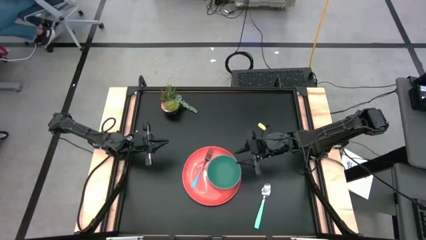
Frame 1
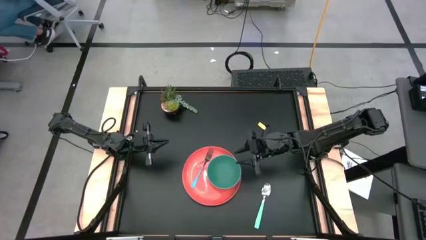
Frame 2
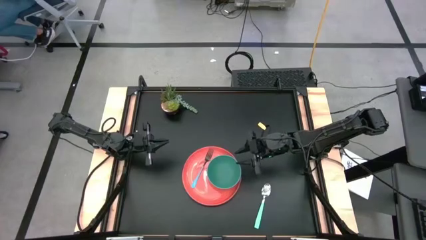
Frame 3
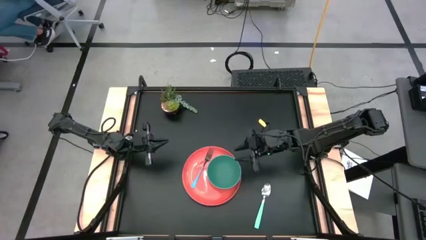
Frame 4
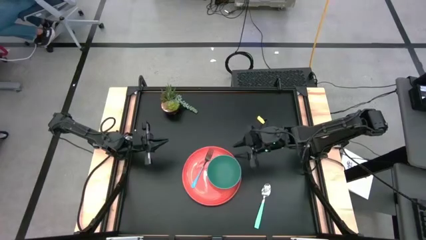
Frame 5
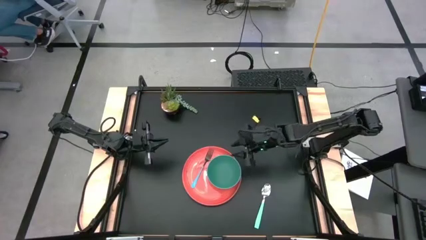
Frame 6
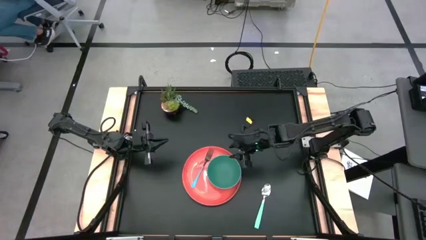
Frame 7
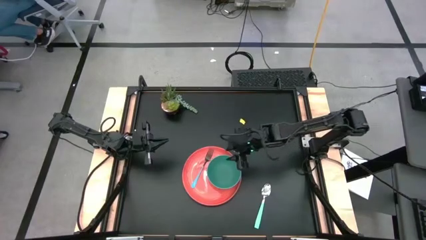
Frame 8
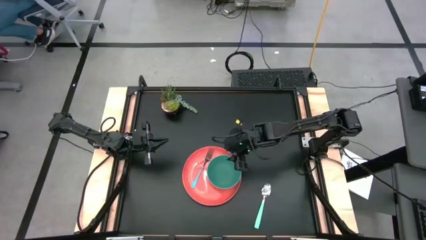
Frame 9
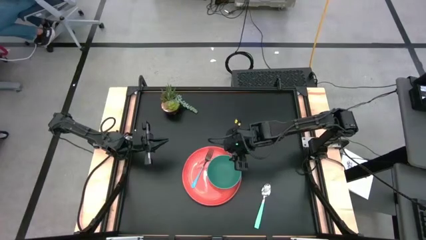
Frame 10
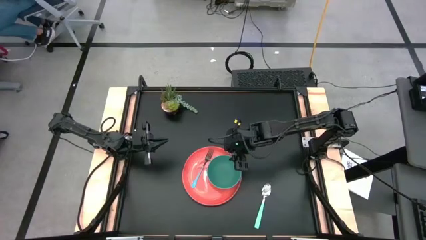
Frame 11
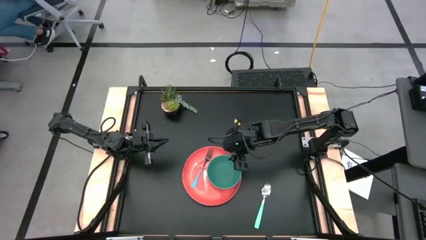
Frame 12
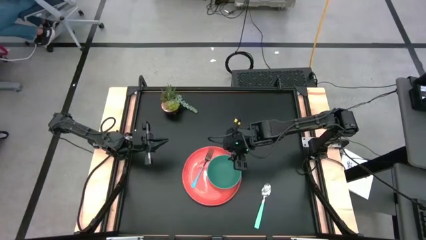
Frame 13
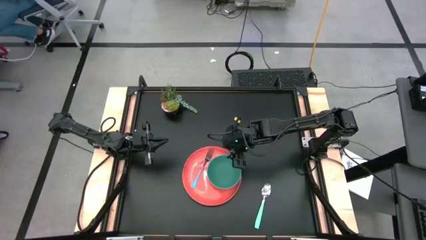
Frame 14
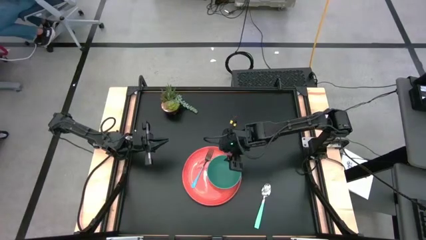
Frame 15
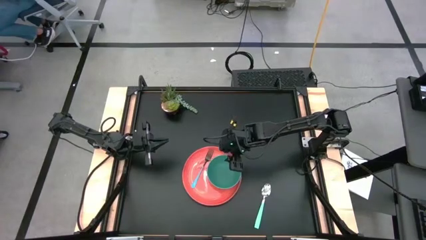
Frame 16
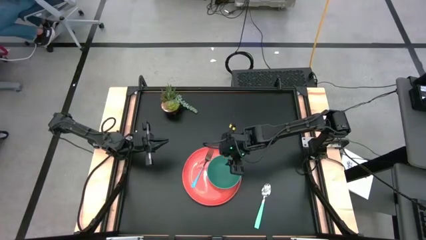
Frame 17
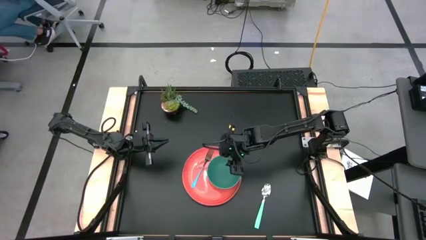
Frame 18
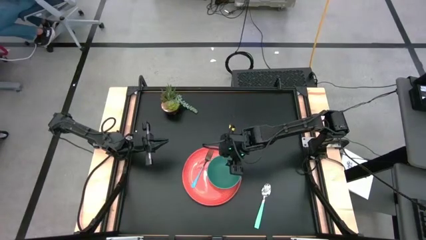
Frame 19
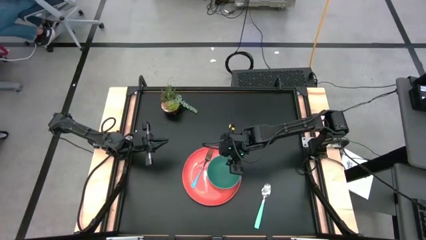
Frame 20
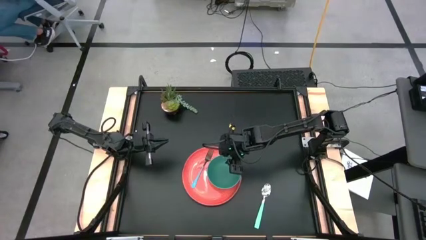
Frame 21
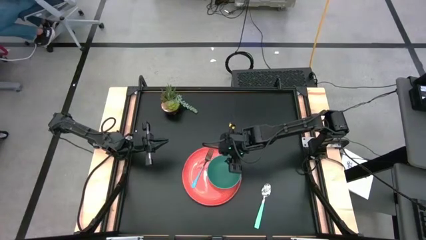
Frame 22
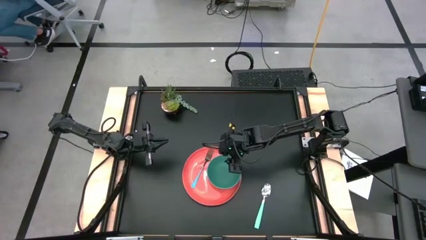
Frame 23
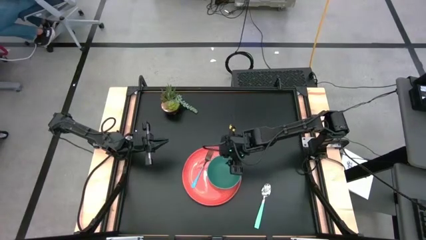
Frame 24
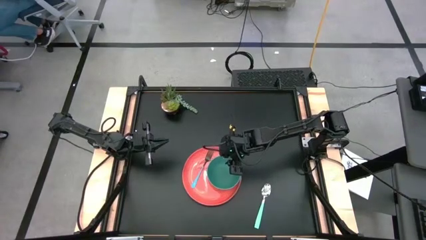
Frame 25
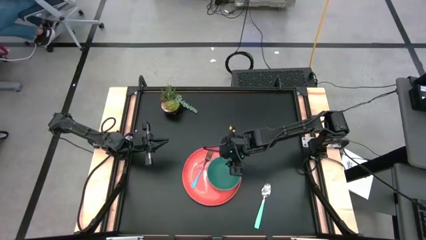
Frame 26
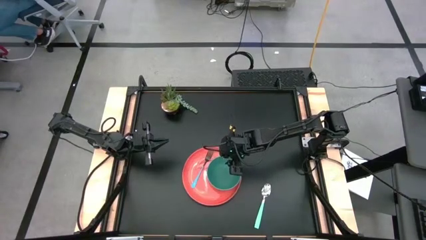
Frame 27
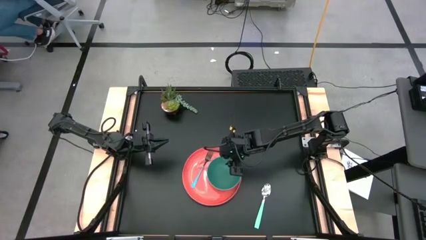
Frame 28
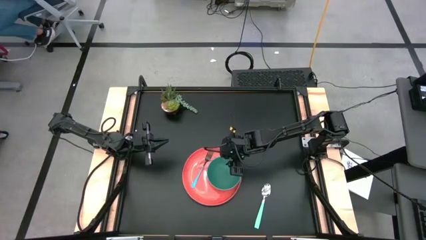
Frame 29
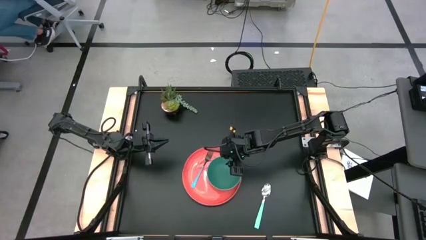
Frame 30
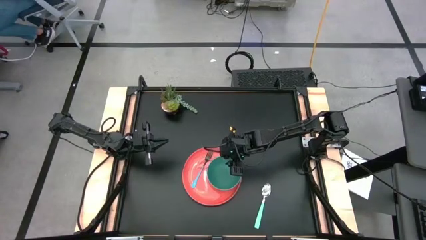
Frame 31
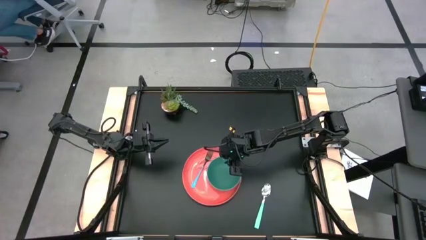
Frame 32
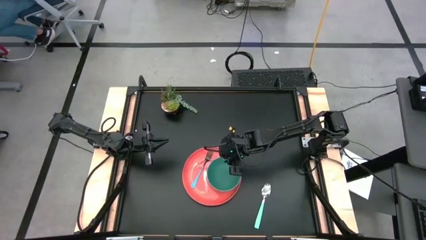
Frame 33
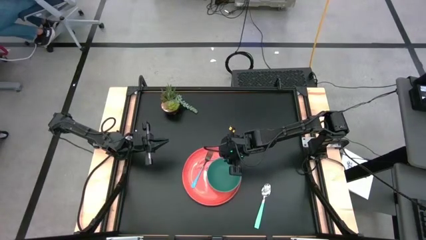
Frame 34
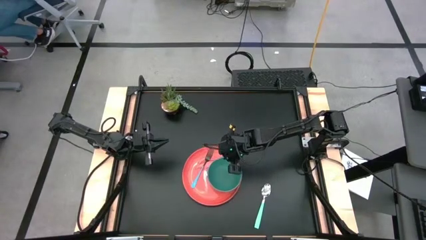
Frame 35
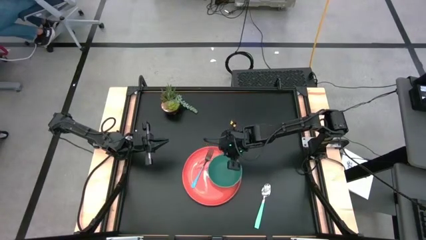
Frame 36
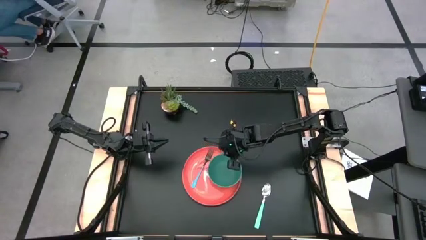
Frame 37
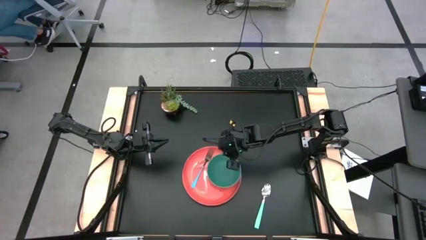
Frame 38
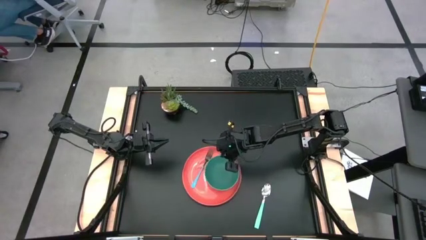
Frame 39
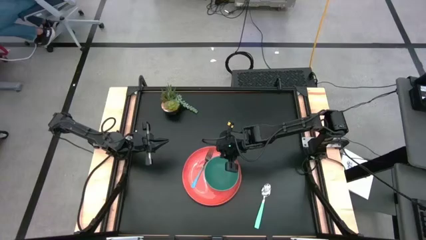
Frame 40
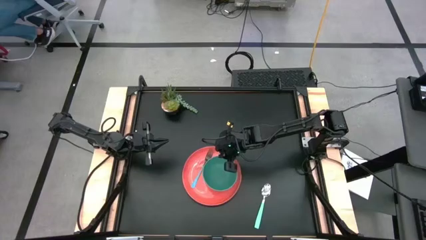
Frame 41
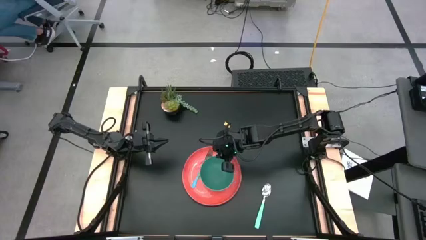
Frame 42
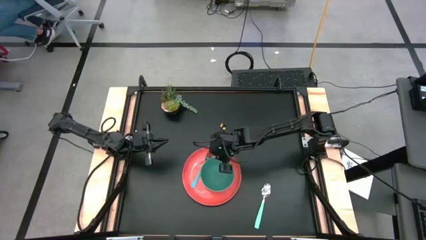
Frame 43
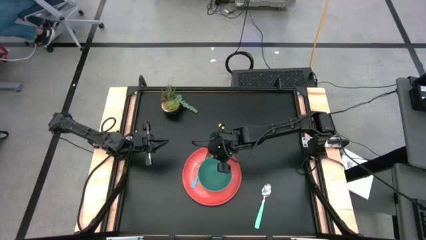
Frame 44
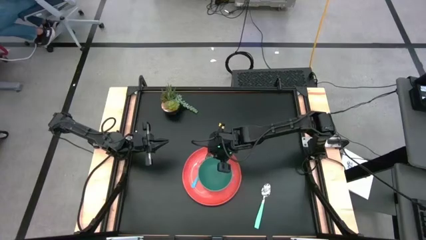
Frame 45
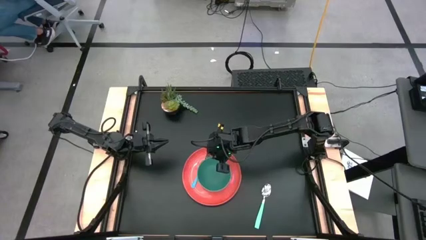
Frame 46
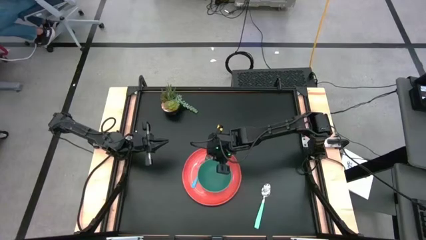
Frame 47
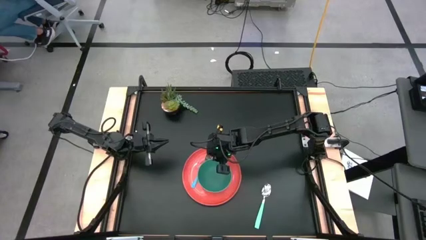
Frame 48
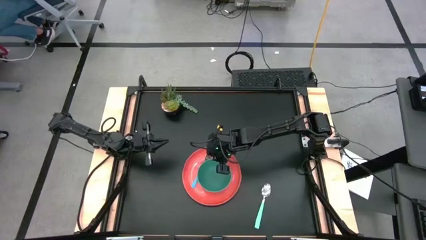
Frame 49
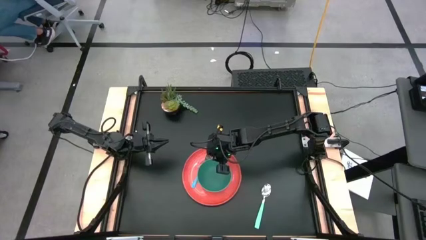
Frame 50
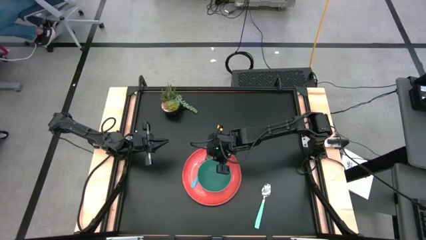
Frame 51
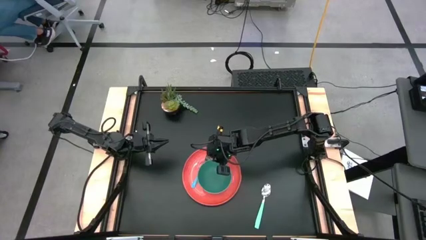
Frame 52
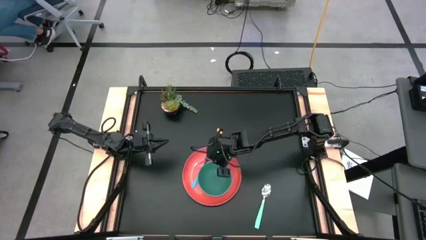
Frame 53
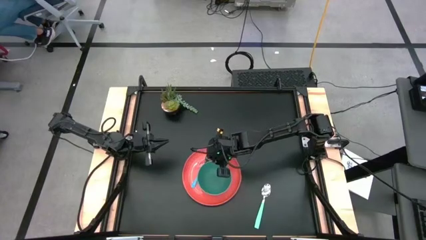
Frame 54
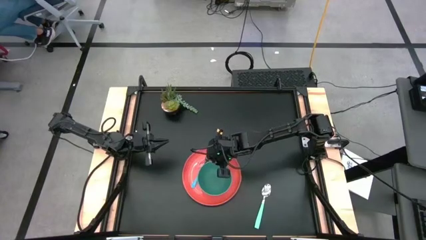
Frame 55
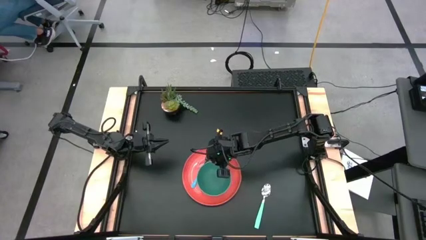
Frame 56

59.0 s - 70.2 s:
Task: Set table place
Adjust the green bowl on the orange plate

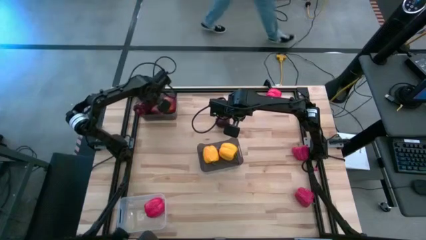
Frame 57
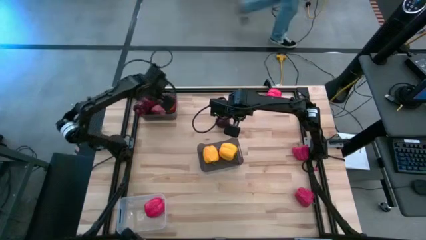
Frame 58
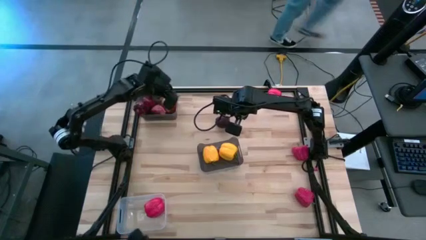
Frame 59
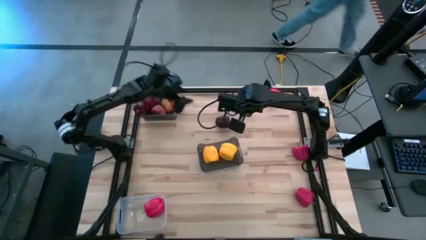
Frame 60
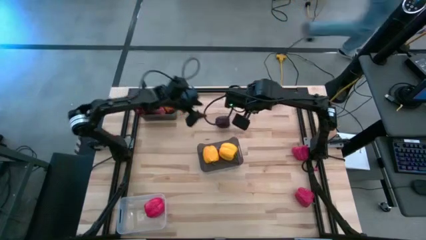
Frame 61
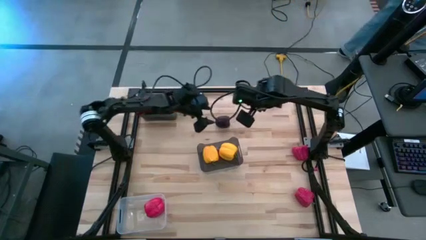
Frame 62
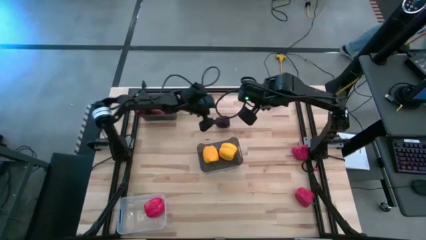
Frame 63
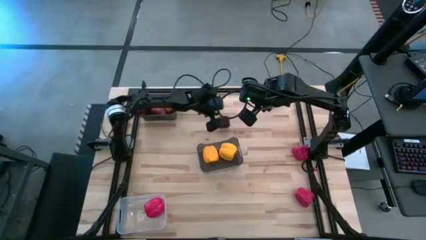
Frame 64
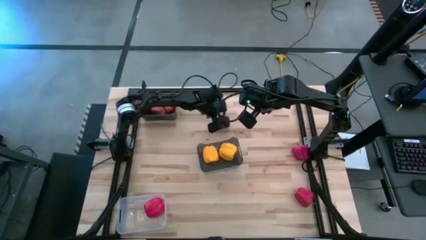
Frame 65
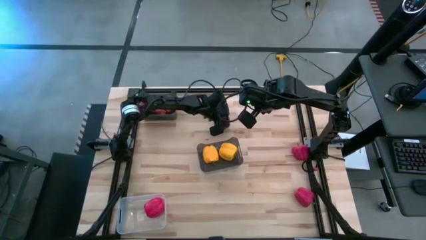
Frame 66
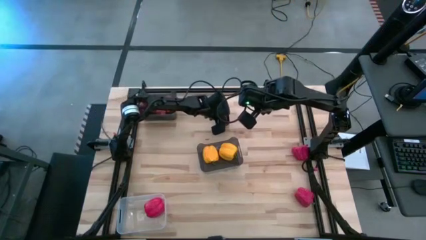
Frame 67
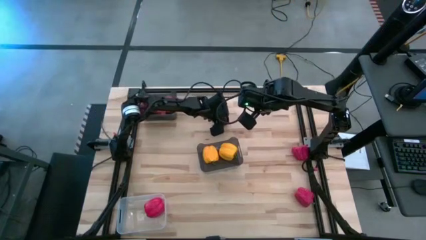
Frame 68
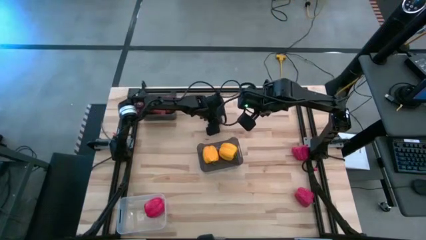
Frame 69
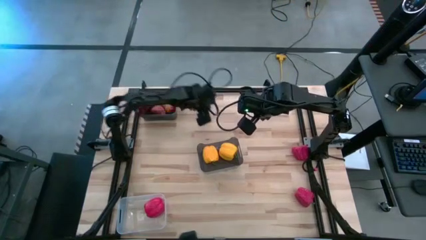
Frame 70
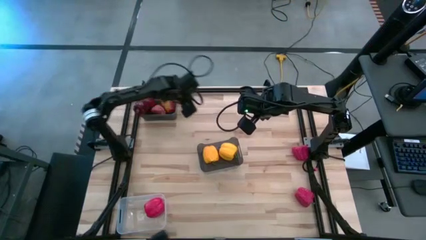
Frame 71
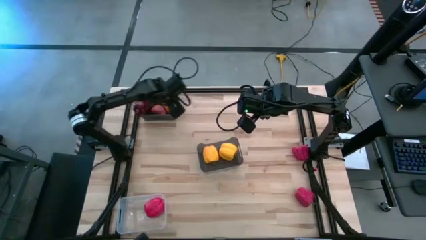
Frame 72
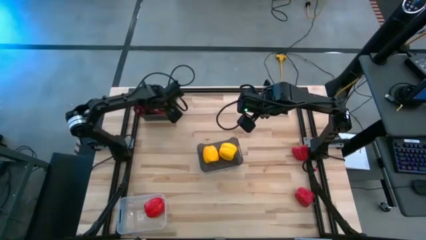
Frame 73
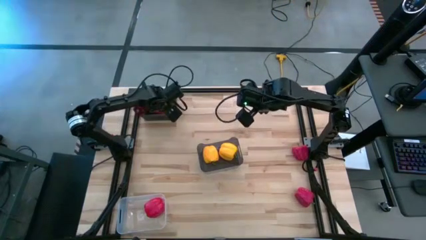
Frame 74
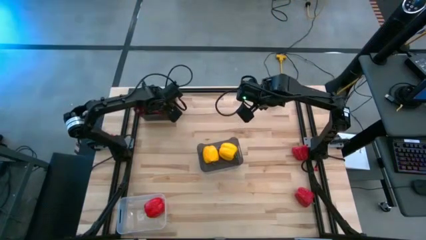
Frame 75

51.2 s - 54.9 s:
Task: Sort produce into baskets
Put the apple into the top black bin
